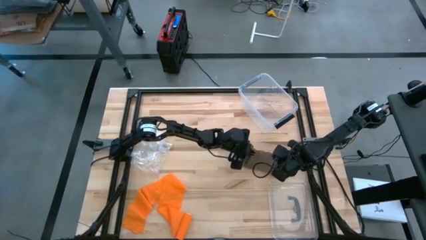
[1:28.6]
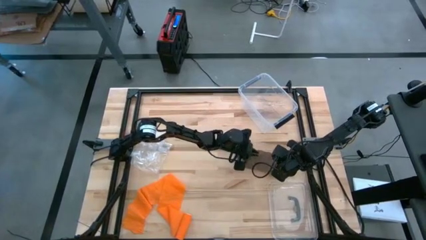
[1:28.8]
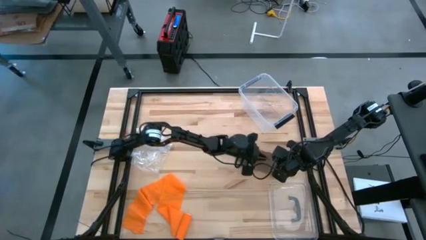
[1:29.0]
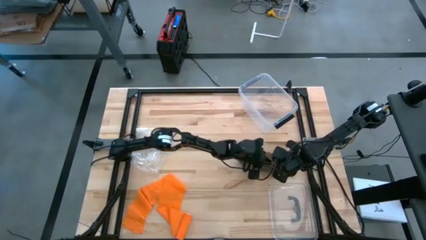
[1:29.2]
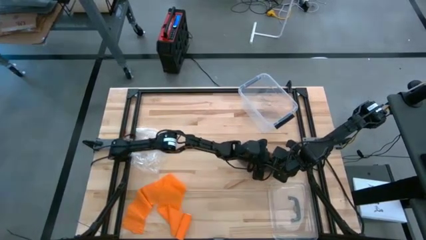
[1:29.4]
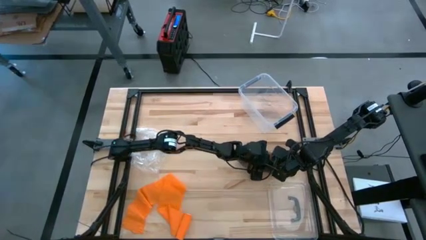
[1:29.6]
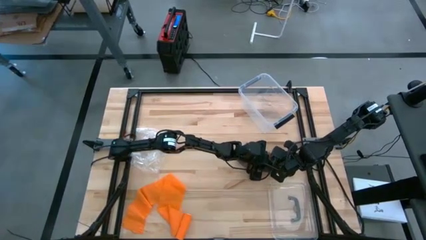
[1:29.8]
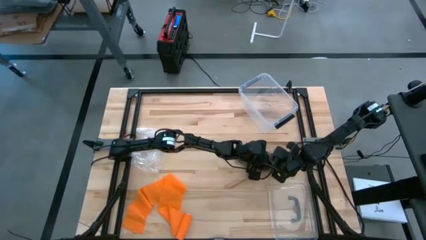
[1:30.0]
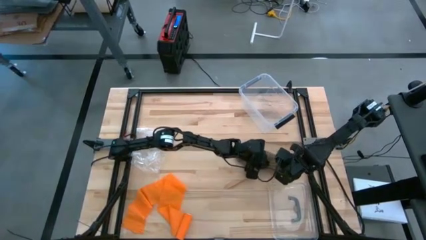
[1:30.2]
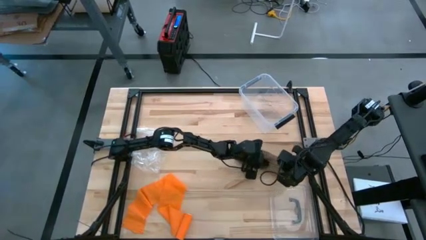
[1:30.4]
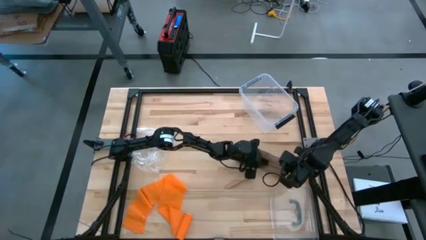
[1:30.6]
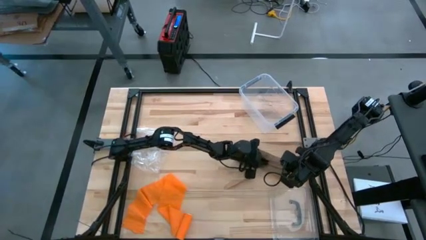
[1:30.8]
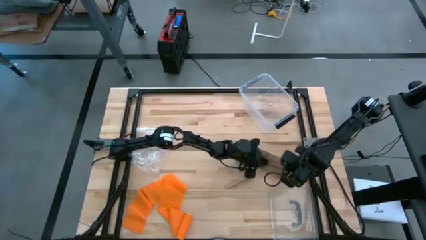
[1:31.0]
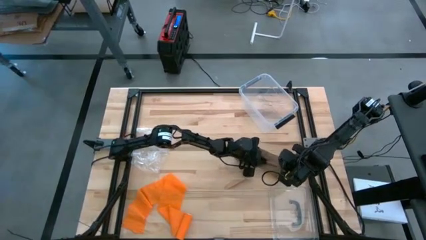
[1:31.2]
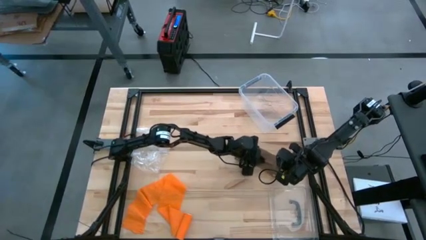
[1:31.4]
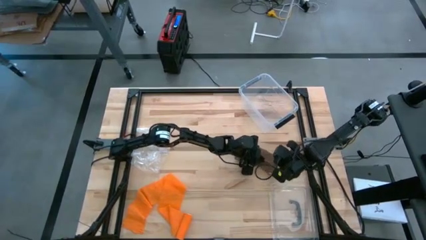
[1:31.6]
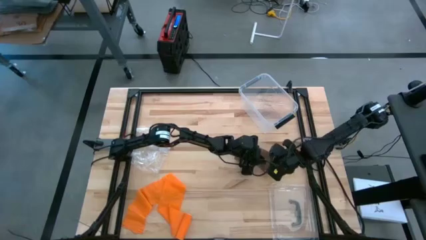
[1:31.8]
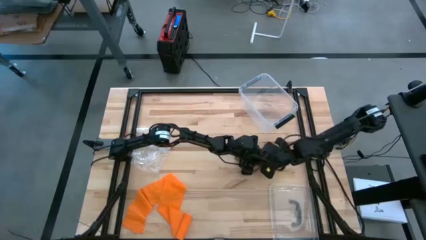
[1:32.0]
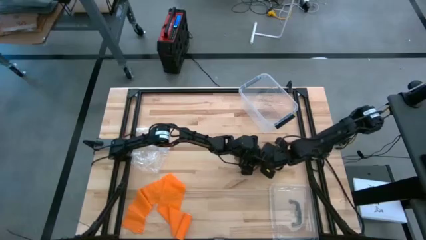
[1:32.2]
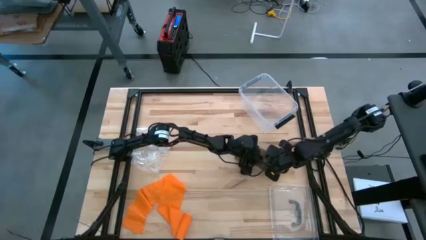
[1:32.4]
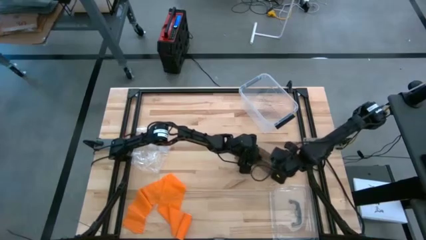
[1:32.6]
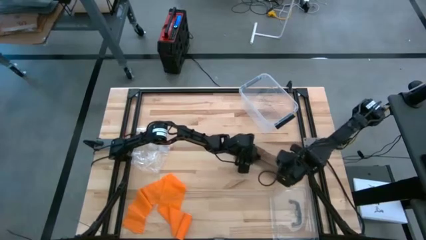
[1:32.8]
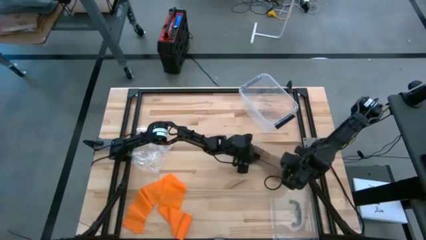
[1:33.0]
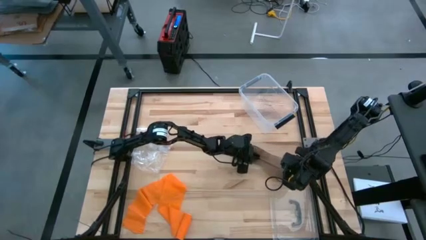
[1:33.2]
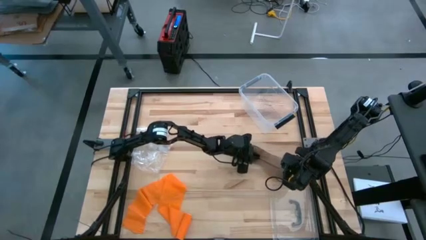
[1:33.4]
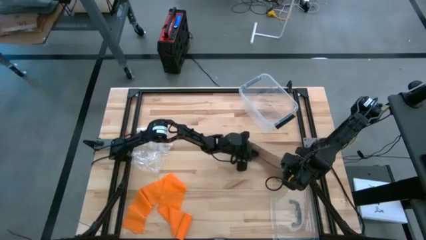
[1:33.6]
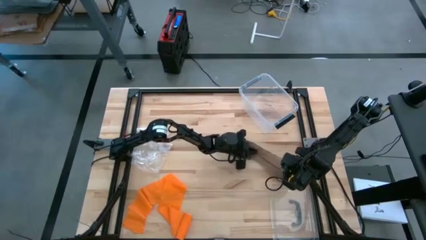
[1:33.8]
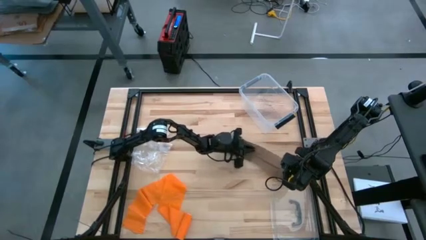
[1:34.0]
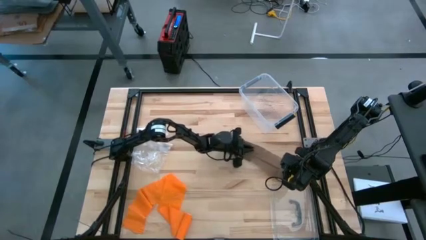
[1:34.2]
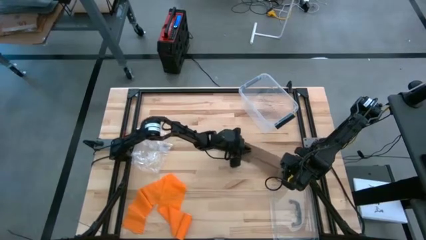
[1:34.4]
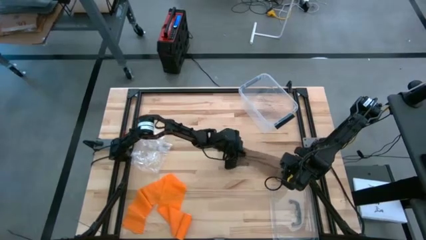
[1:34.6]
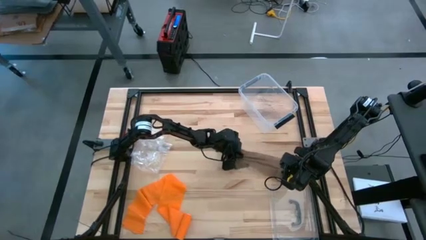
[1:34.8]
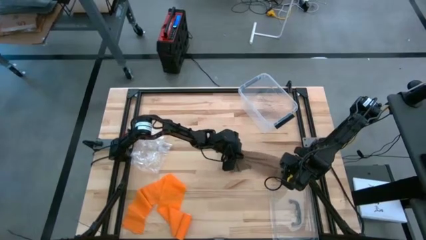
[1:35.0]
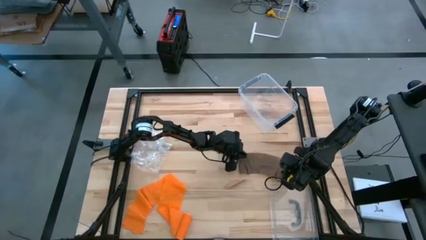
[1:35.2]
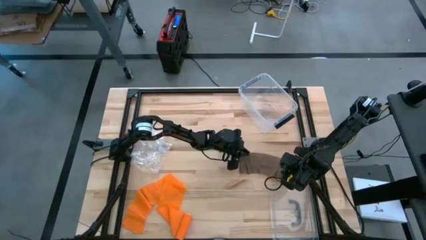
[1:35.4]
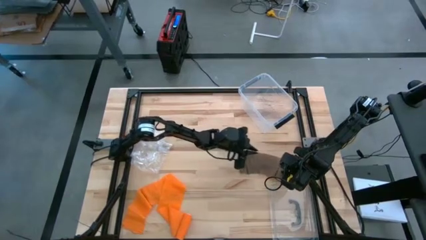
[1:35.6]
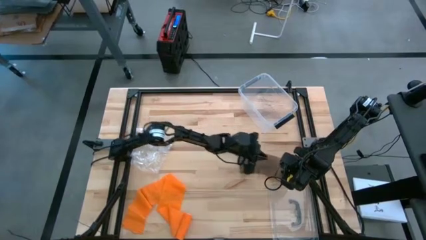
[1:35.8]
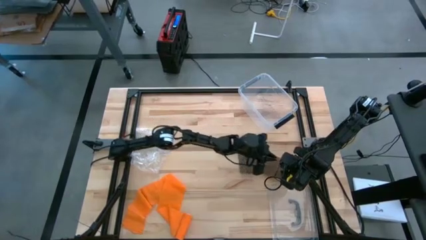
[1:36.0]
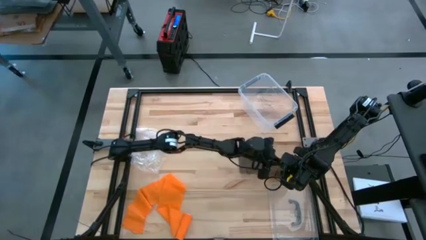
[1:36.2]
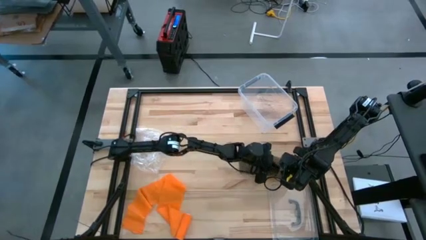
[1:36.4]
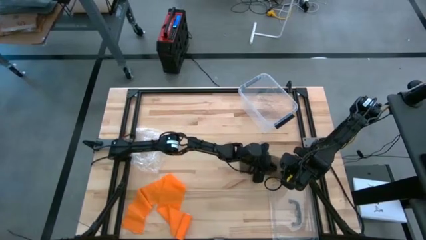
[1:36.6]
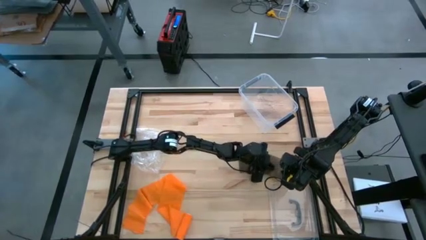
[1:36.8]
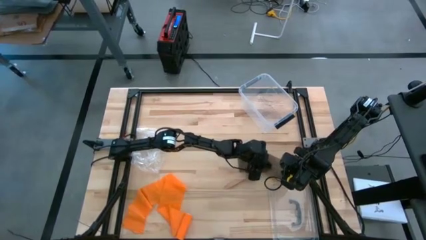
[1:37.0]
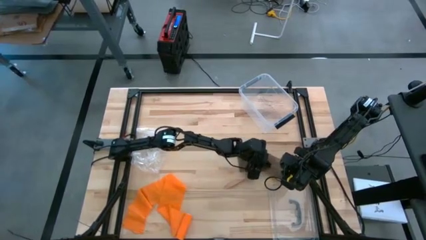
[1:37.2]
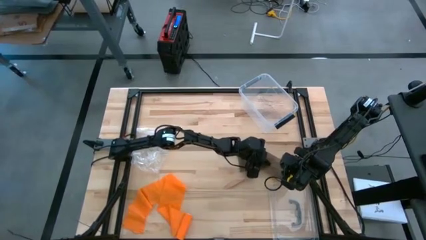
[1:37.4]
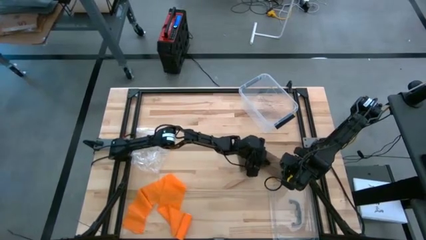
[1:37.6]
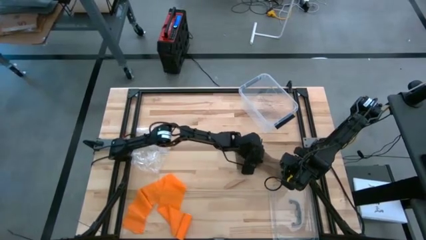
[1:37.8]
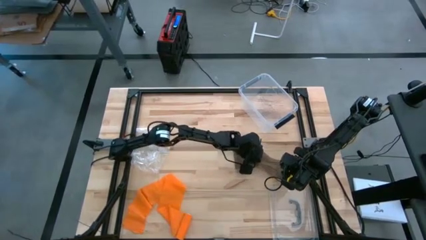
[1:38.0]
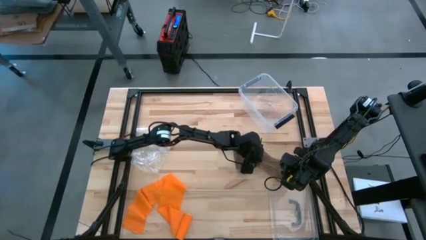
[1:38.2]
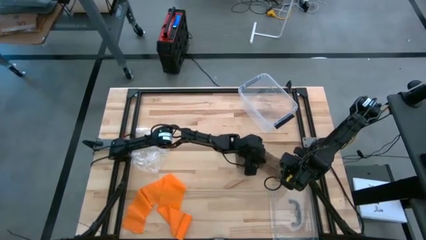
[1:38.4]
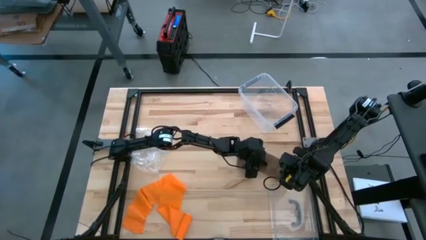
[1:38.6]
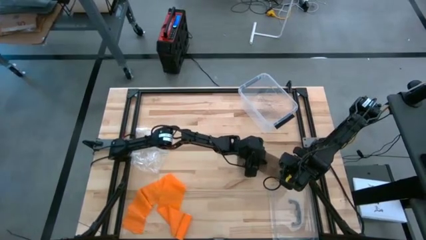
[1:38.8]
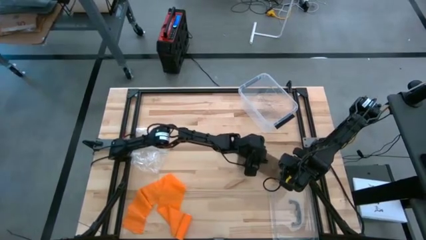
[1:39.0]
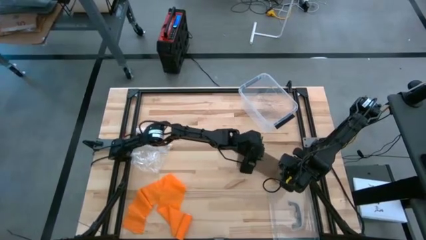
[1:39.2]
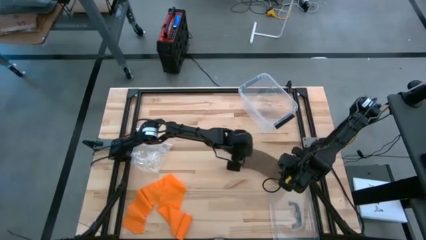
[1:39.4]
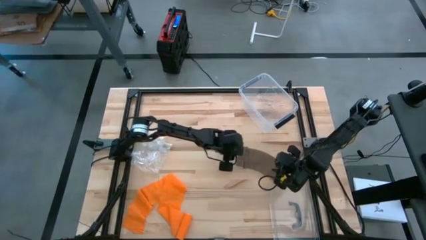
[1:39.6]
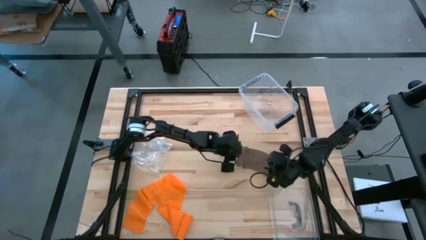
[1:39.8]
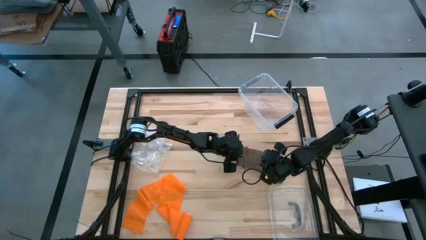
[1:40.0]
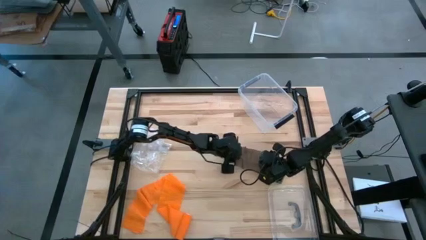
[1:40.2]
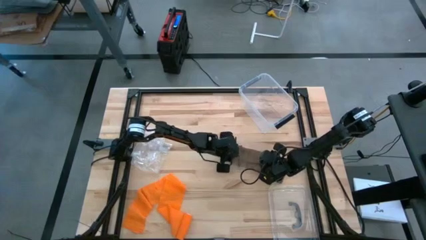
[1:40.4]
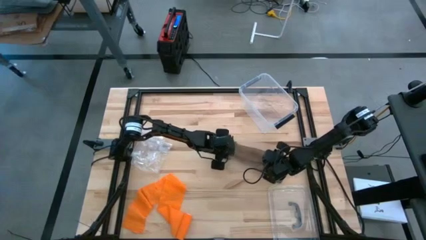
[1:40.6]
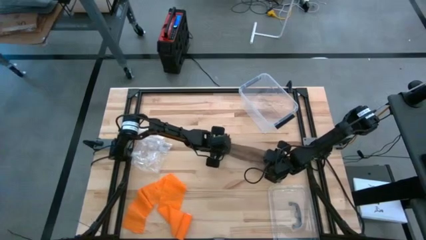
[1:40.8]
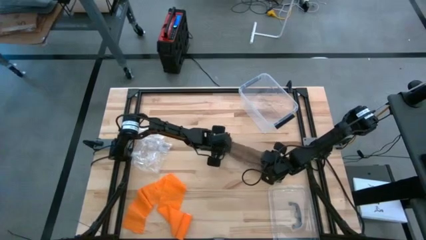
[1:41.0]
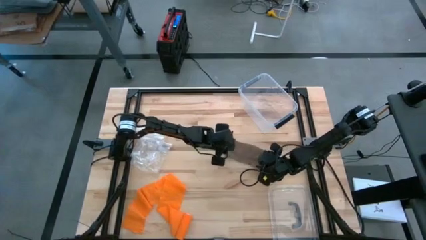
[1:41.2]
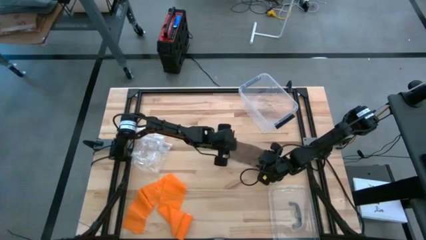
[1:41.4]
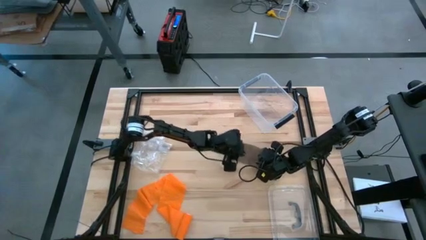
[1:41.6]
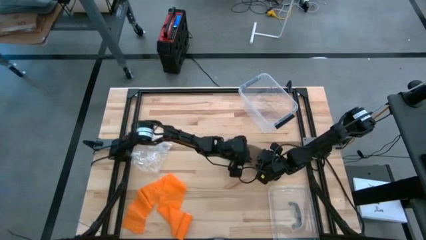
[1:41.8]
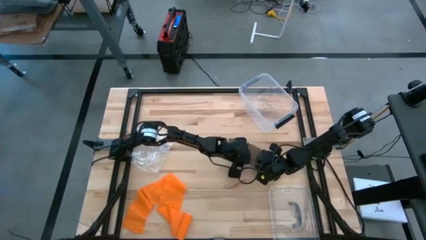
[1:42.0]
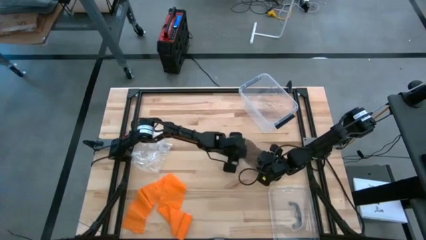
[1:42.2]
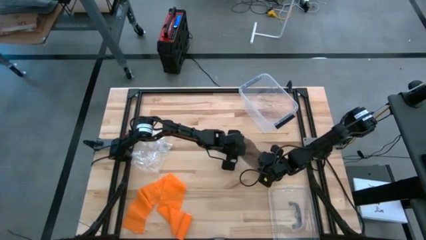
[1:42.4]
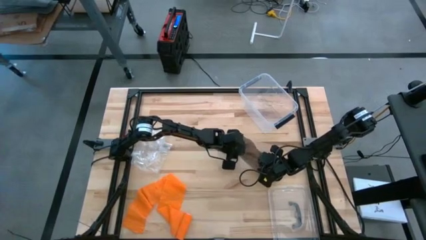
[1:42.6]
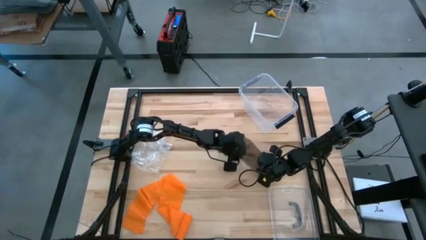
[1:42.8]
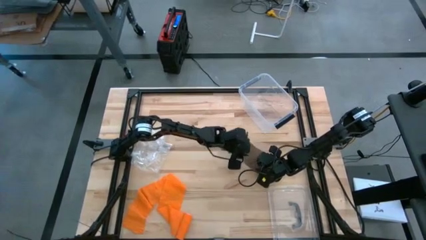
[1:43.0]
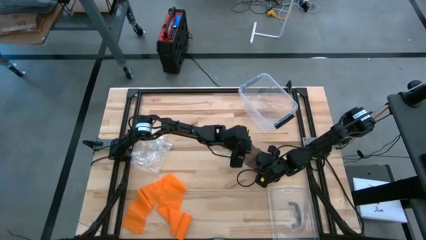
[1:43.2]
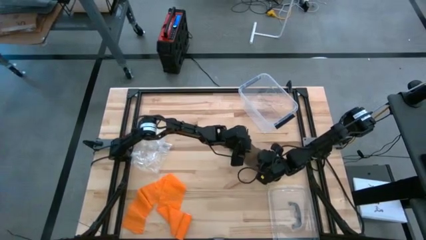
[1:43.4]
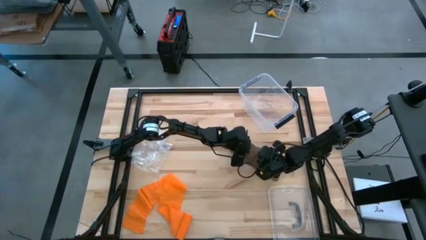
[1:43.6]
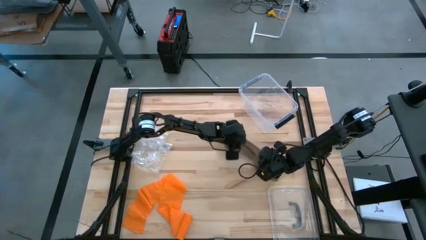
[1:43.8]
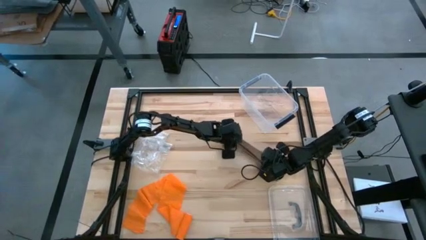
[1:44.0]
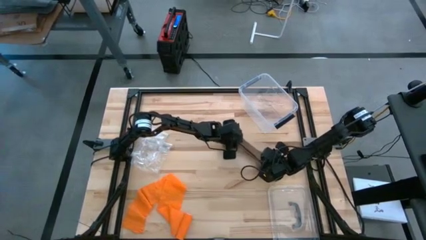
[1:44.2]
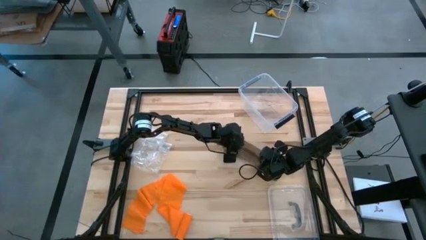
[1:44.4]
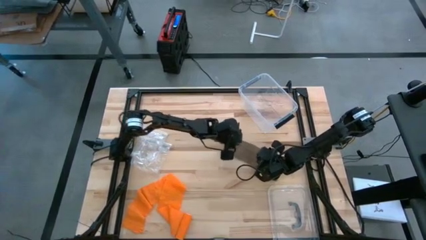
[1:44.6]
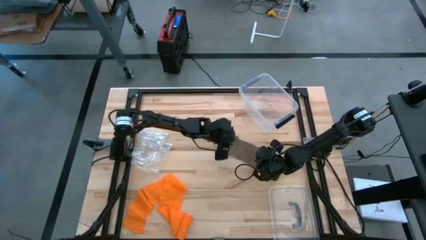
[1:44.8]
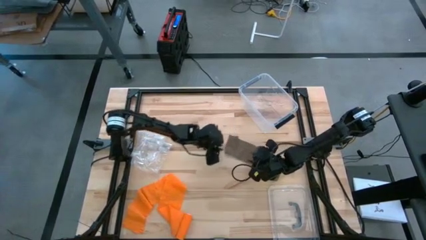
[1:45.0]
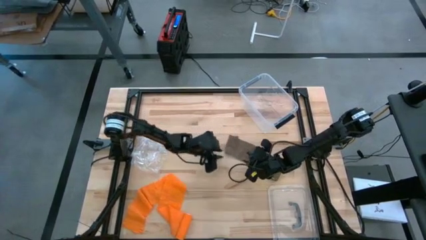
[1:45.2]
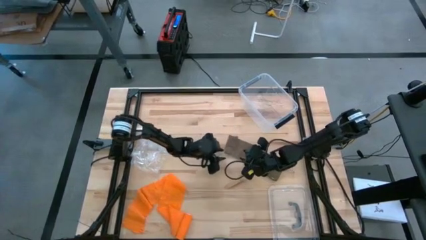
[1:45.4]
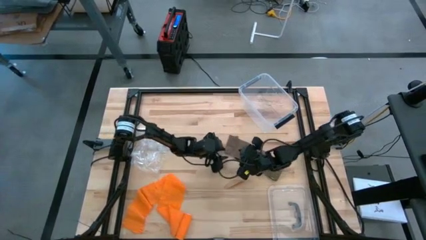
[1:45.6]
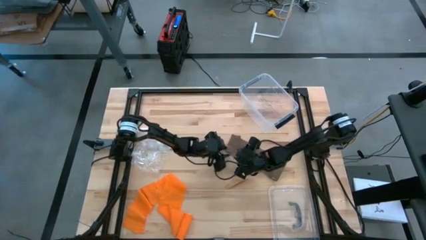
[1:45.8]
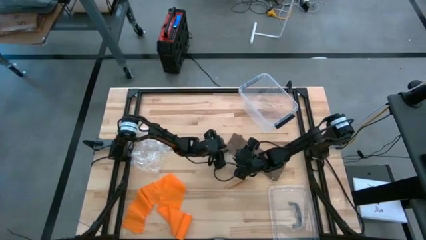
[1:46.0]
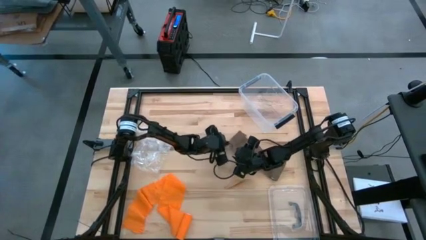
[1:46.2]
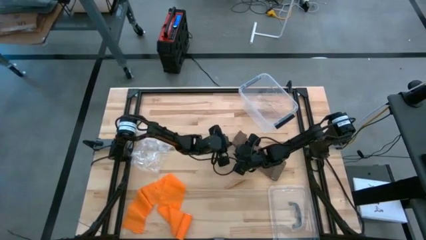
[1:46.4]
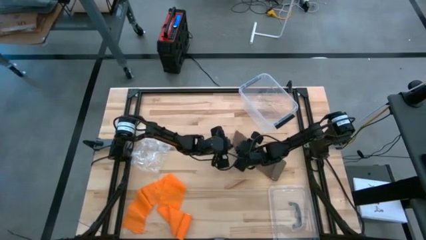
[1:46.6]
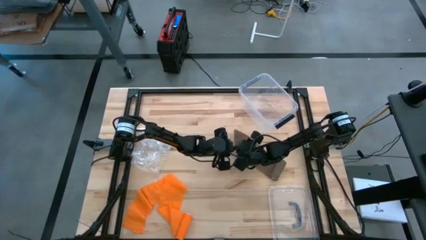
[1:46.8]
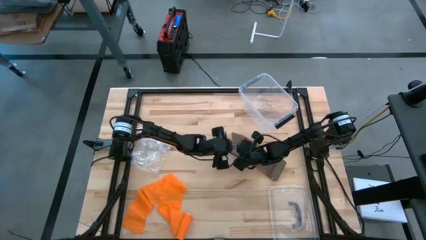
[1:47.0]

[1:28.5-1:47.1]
Task: Roll bandage
Uncoil the brown bandage
